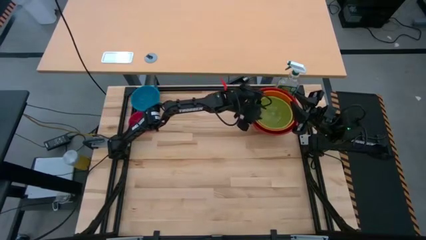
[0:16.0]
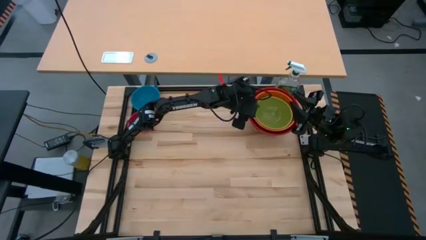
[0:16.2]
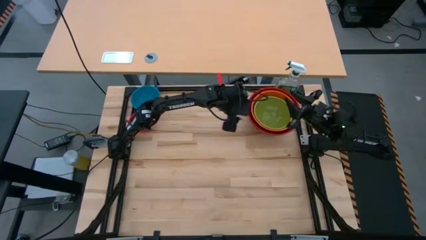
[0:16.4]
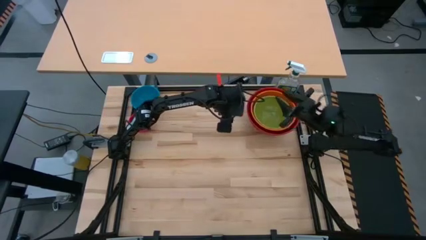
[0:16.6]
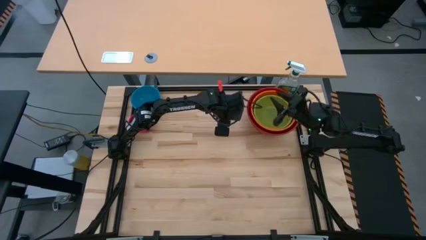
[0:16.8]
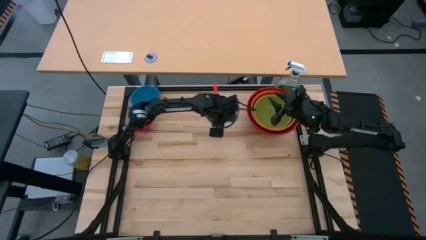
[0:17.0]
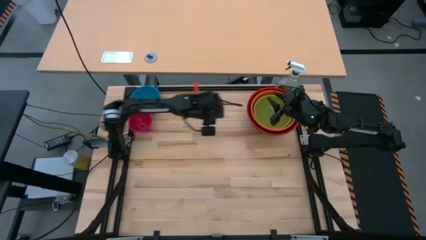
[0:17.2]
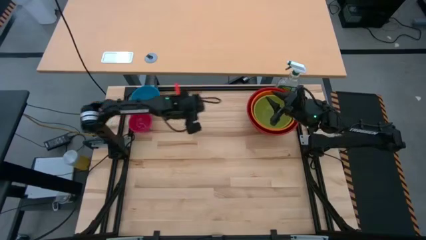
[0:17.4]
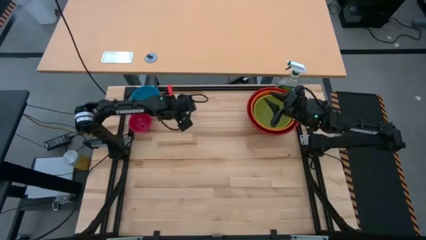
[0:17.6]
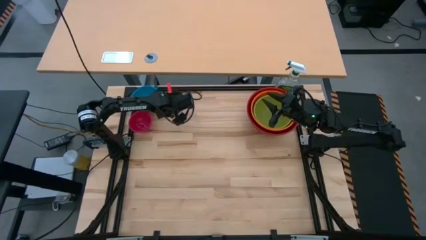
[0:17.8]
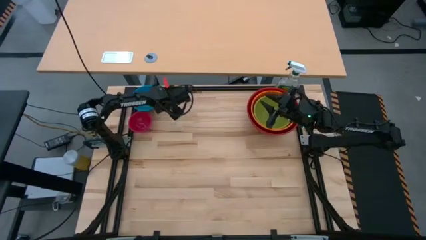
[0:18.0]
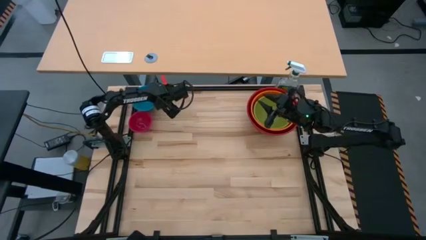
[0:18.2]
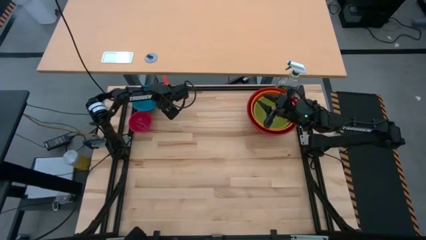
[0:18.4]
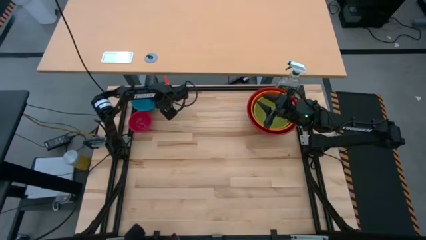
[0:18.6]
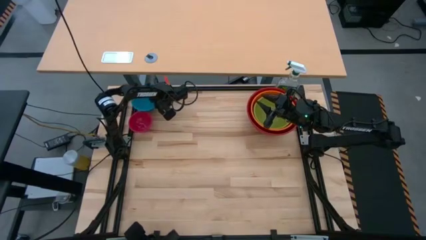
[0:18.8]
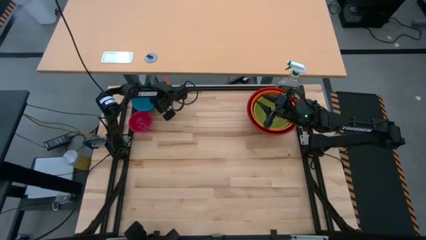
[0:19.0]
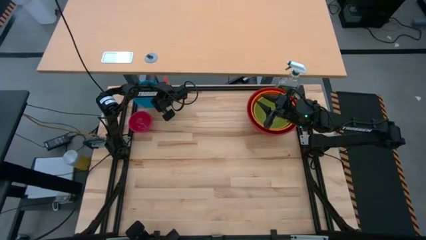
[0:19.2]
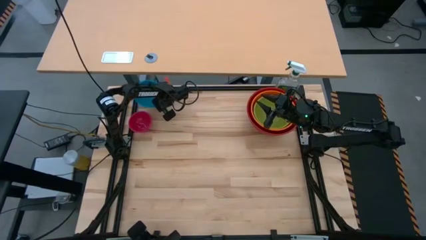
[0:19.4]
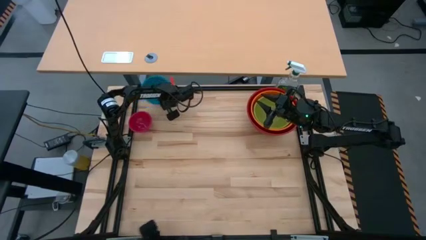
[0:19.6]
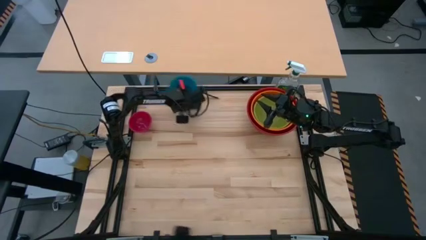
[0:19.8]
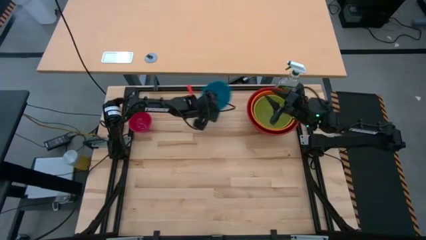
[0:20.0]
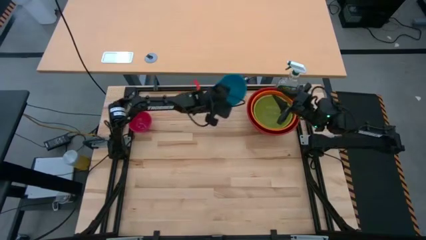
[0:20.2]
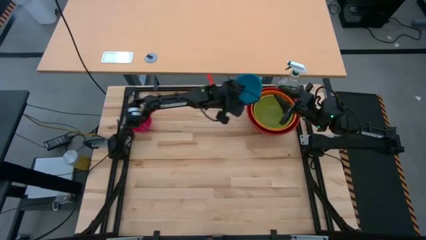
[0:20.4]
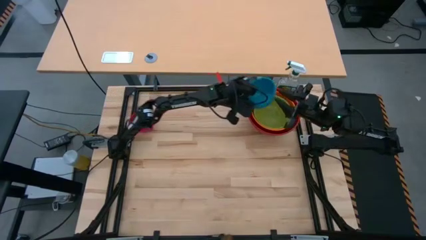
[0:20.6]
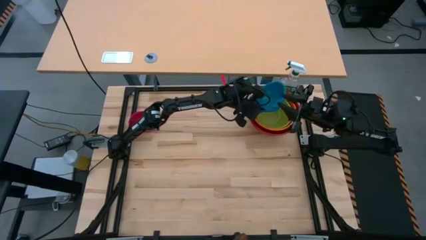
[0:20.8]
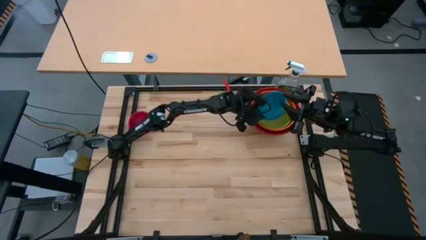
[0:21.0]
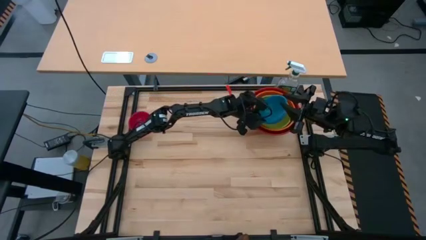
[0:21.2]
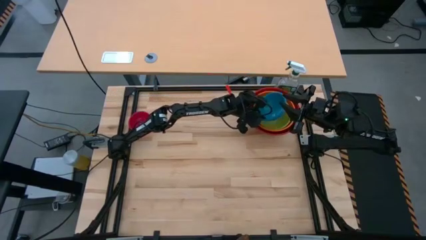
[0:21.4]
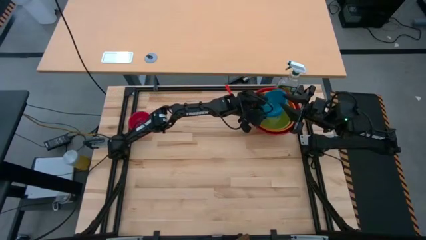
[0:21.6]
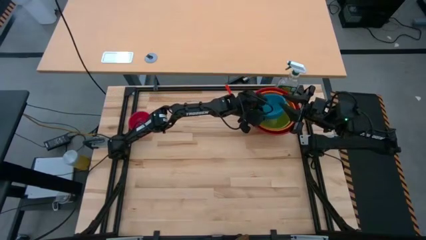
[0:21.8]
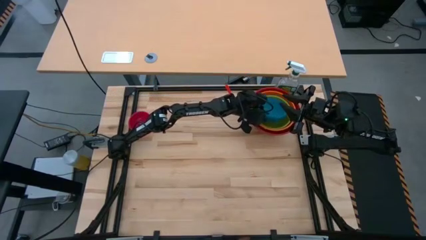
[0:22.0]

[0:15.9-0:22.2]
Stack the blue bowl into the green bowl

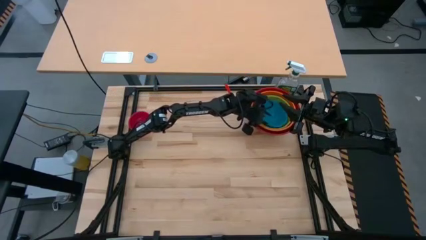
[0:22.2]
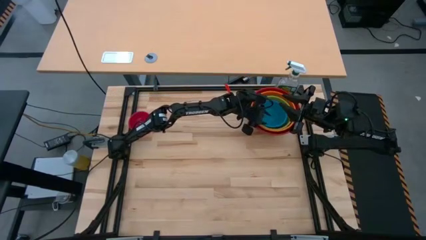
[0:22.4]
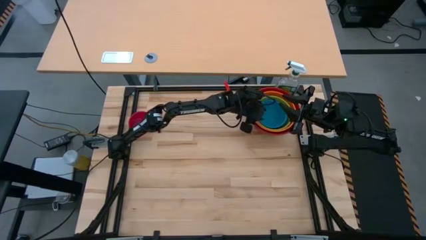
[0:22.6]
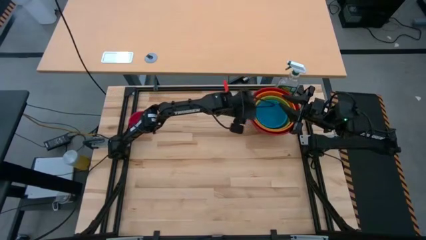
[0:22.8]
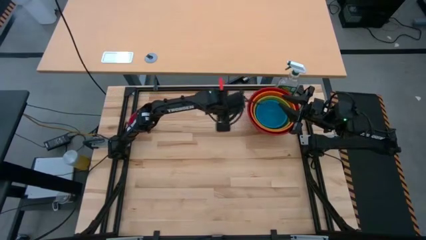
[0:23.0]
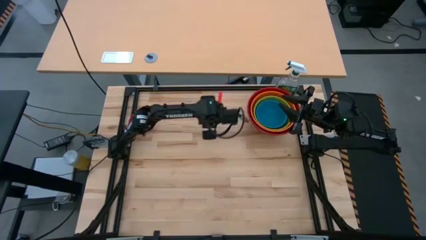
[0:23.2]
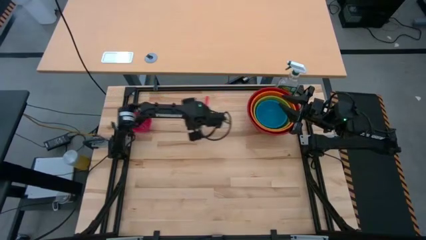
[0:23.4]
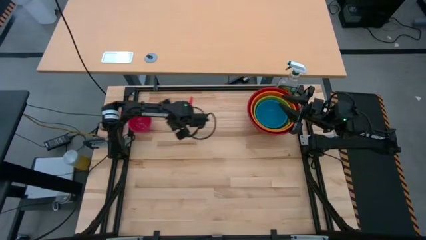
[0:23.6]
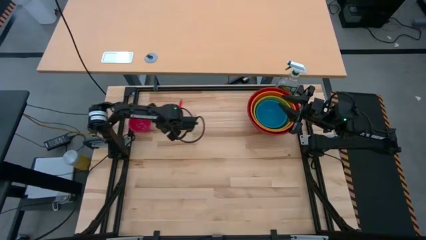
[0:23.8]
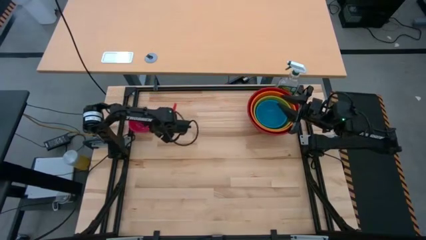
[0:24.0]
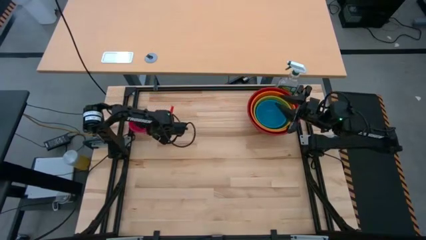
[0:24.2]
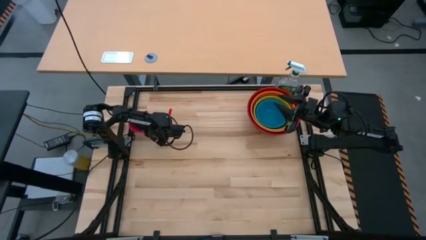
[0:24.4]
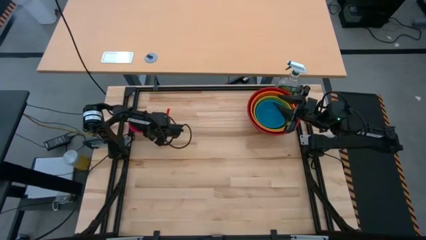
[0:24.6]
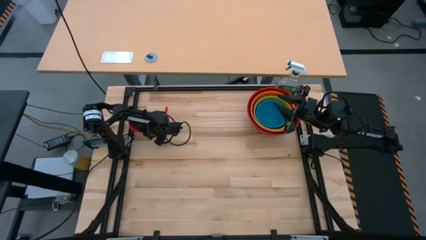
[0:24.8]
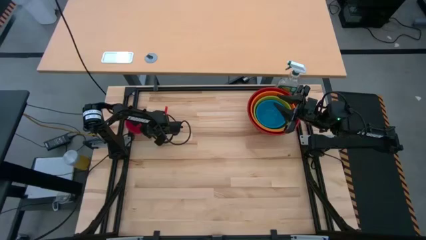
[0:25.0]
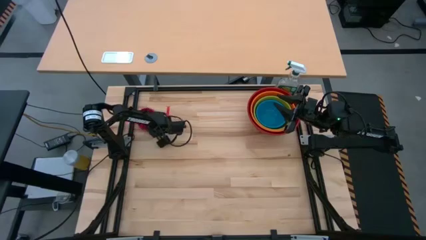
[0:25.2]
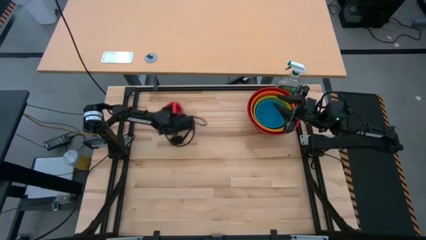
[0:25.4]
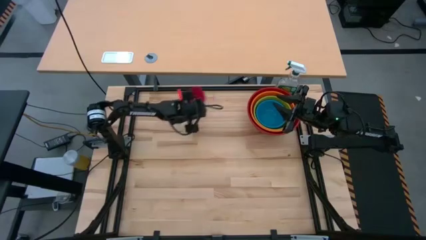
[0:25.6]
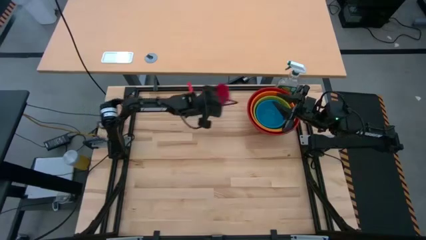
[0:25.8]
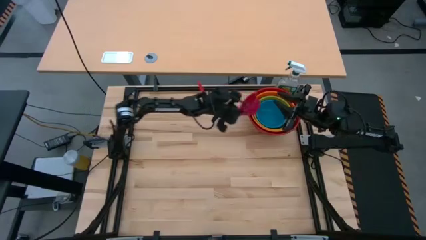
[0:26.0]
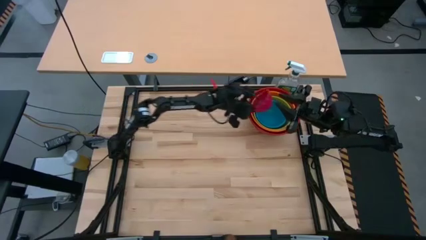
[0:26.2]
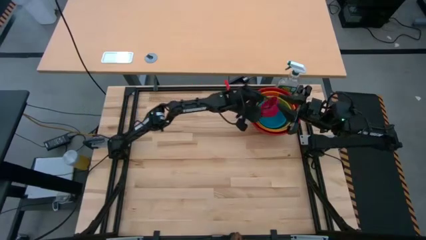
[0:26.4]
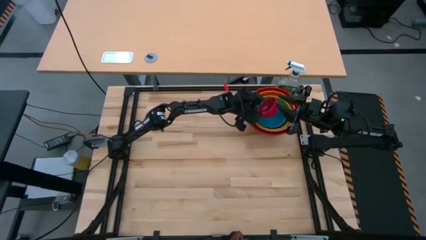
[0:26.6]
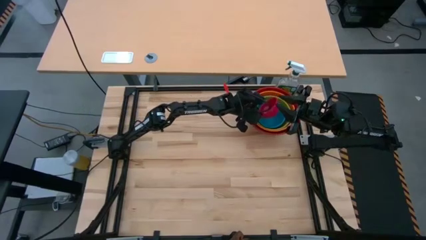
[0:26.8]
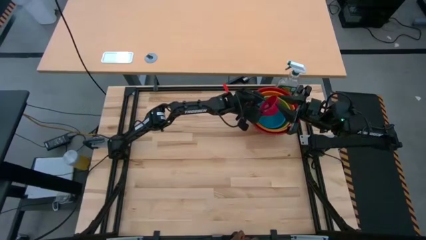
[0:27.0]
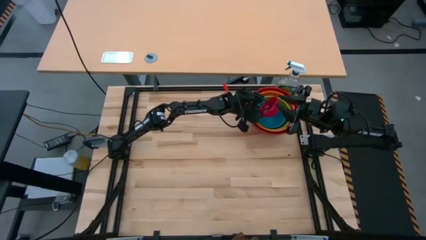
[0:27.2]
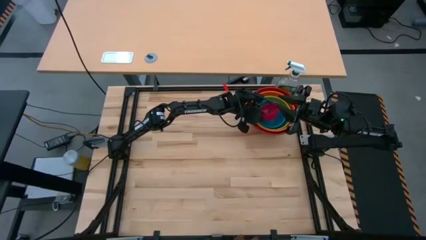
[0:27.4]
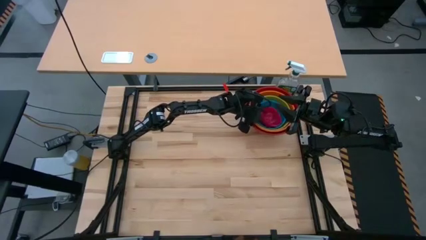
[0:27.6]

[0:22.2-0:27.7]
Stack the pink bowl into the blue bowl

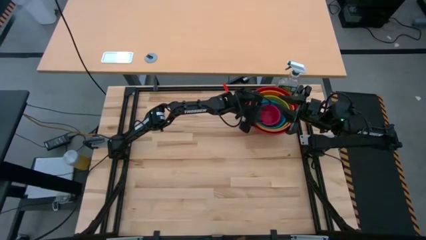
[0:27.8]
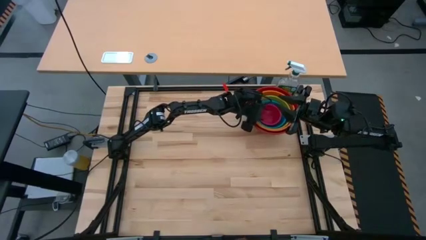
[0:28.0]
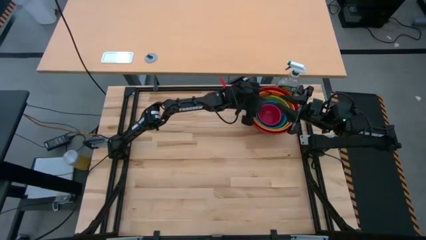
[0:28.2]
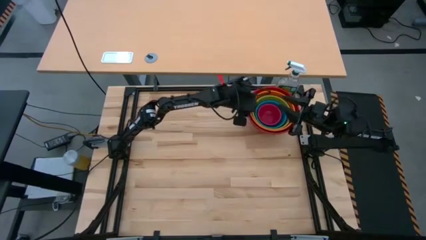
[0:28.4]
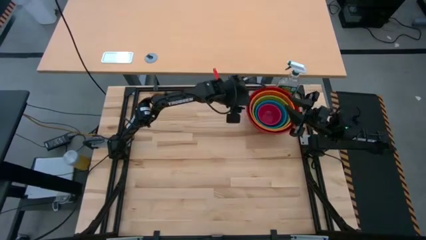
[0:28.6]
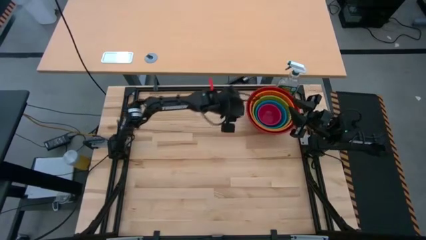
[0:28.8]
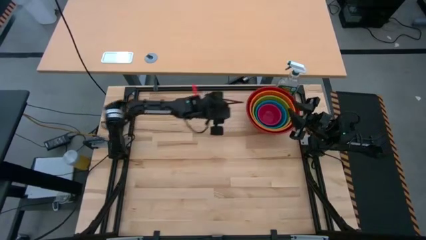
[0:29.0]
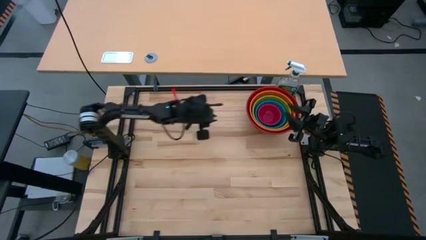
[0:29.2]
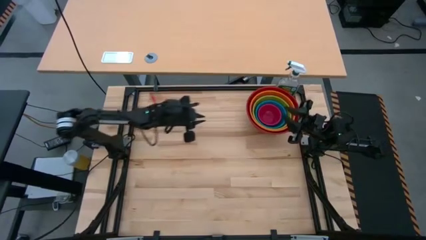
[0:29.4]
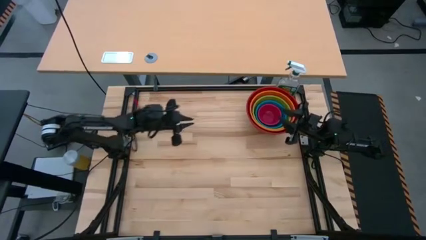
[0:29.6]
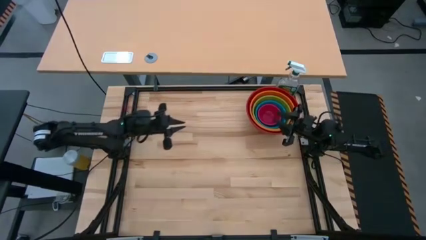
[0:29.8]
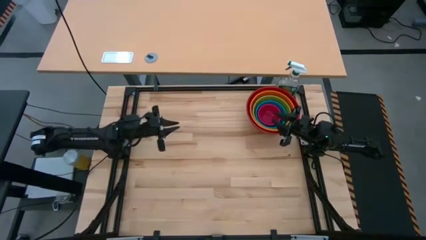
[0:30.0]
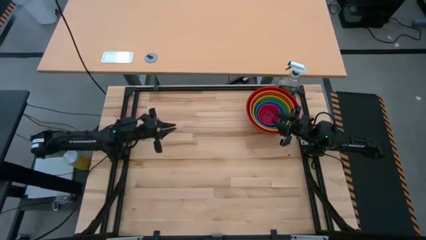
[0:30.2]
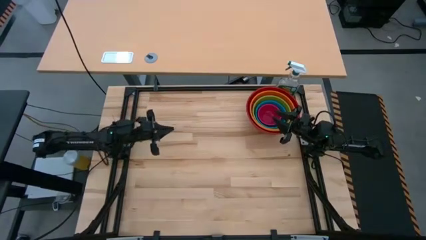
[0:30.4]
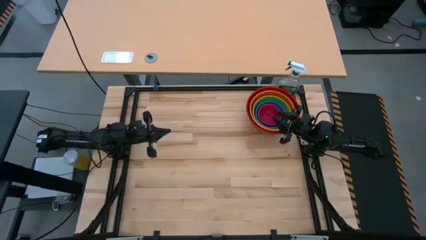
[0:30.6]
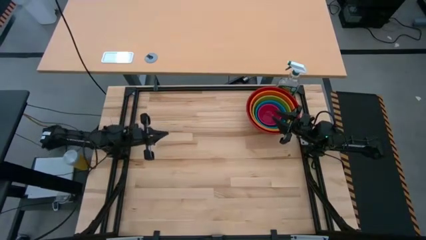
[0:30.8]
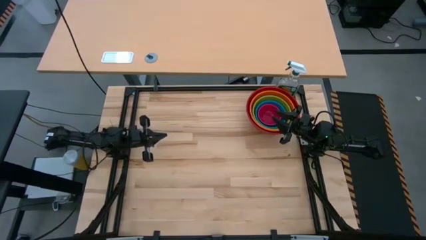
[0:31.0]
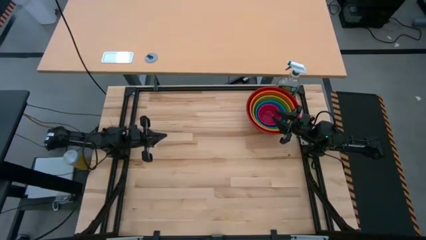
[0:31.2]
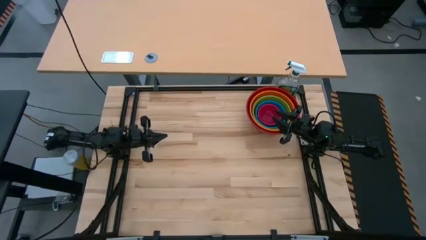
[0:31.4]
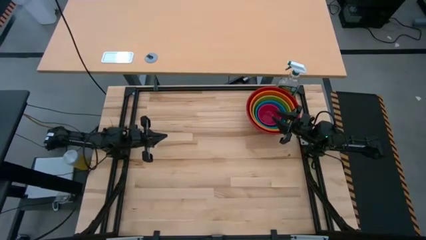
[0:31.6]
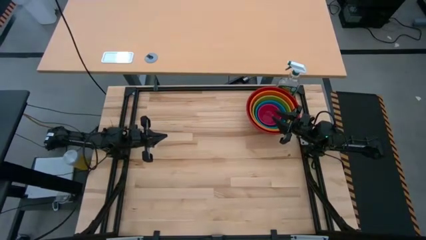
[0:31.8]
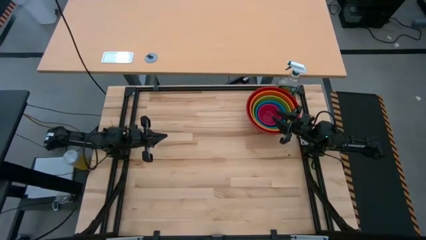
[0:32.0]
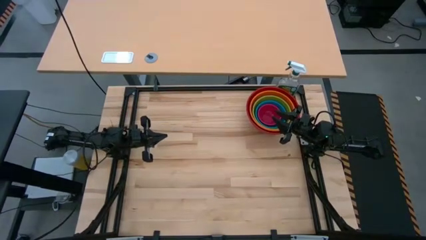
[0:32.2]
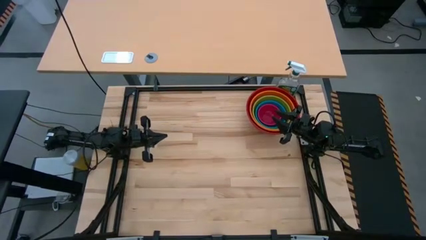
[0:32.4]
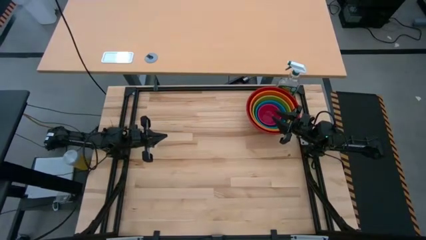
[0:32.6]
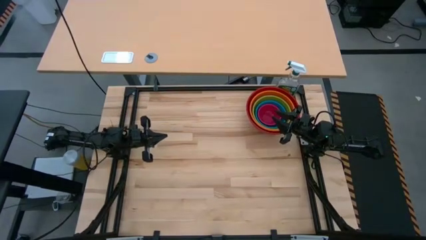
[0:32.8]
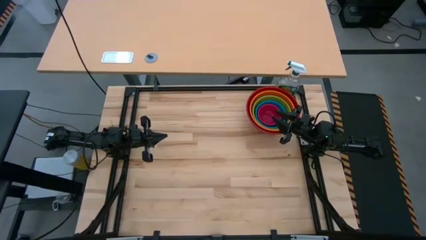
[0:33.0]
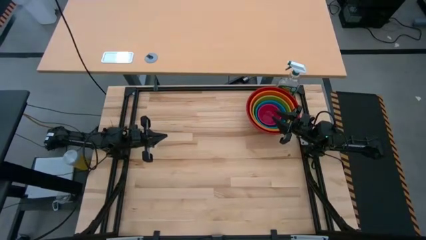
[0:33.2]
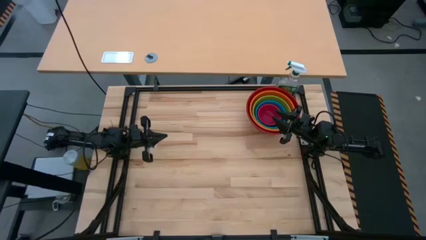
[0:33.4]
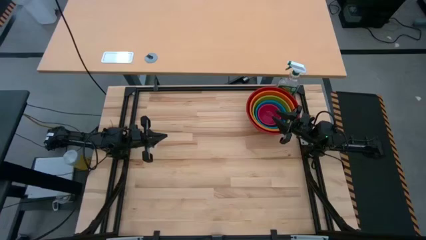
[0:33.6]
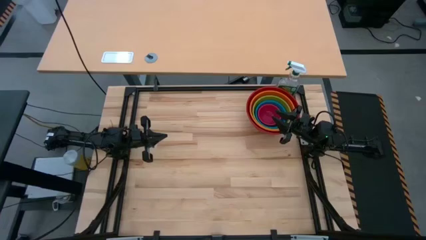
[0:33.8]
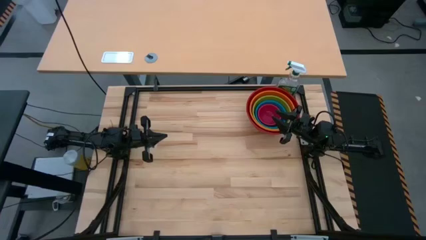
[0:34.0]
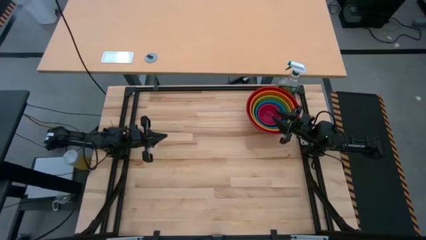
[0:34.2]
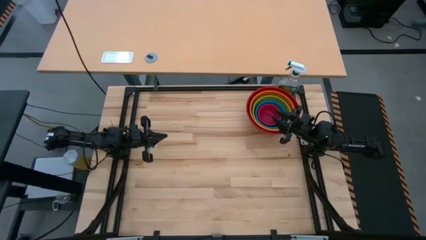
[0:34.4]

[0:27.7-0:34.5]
Return to Home Position
